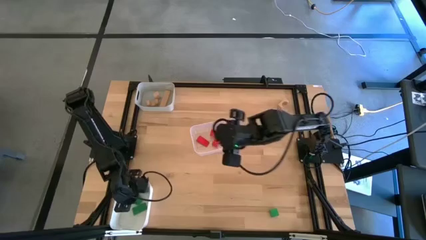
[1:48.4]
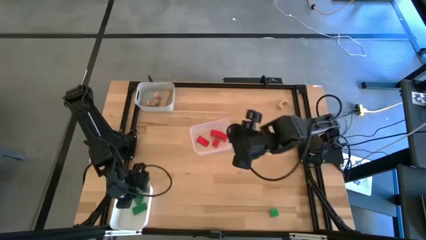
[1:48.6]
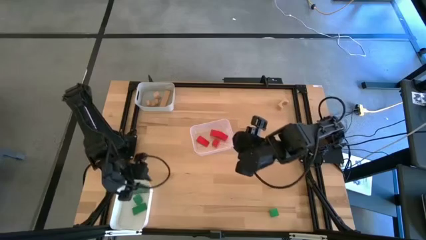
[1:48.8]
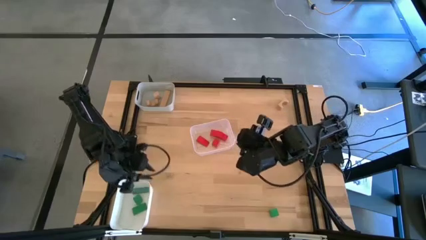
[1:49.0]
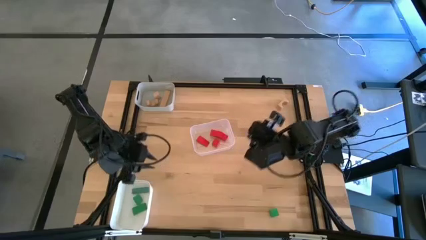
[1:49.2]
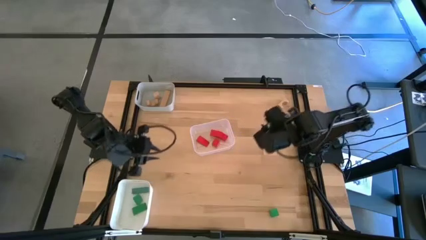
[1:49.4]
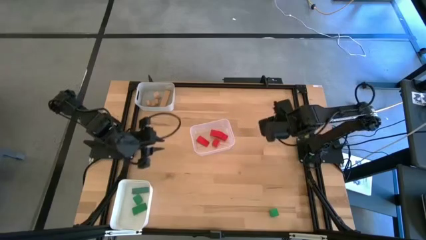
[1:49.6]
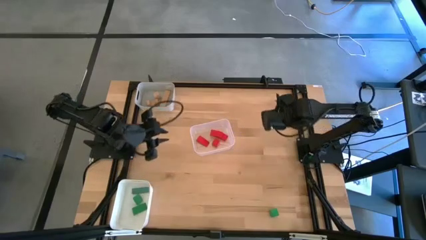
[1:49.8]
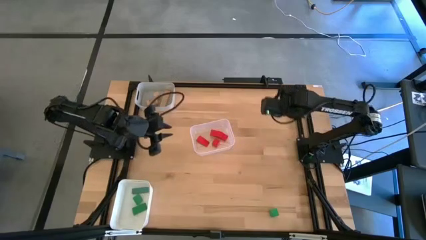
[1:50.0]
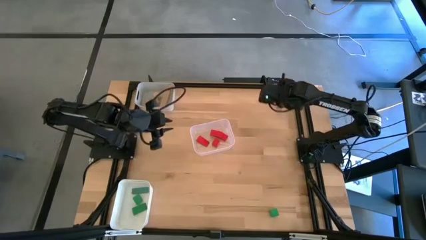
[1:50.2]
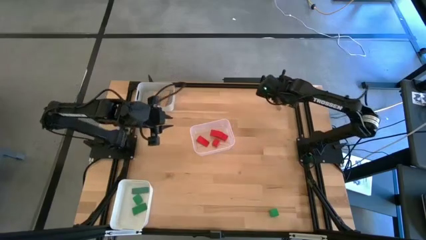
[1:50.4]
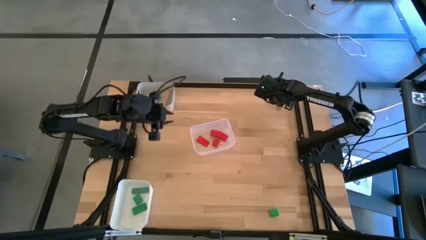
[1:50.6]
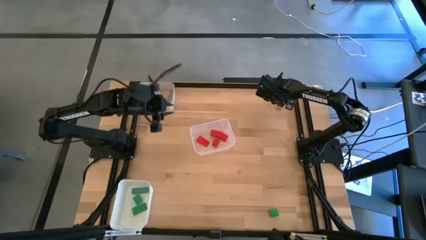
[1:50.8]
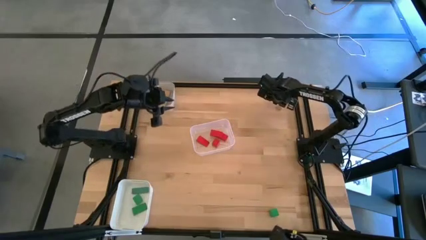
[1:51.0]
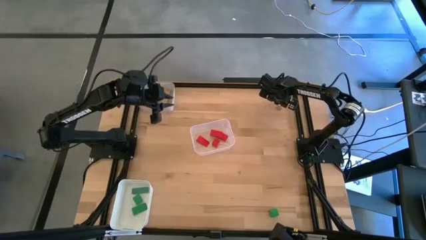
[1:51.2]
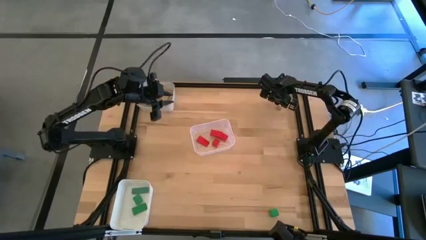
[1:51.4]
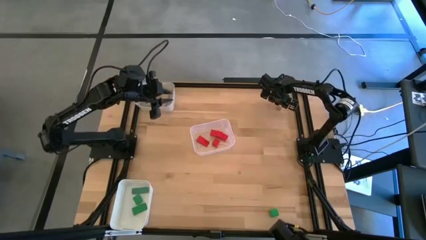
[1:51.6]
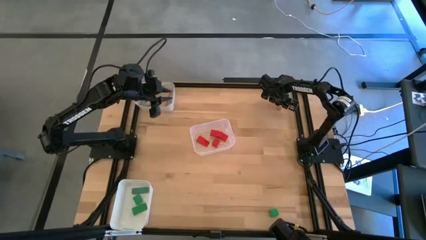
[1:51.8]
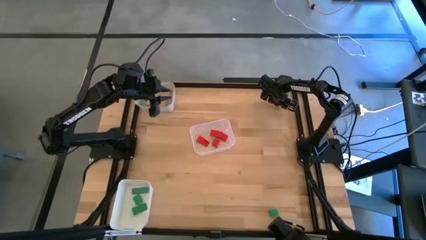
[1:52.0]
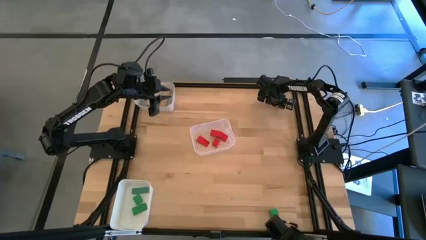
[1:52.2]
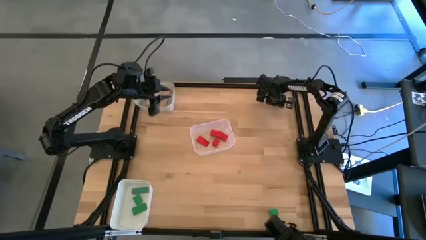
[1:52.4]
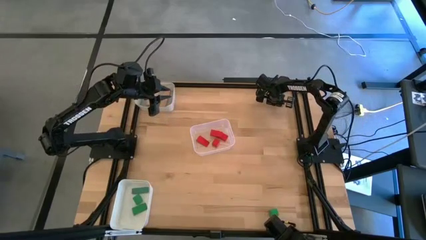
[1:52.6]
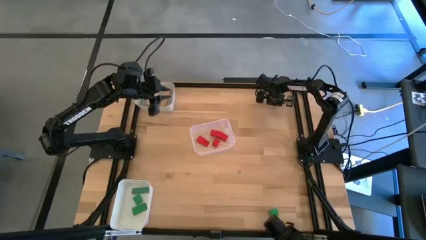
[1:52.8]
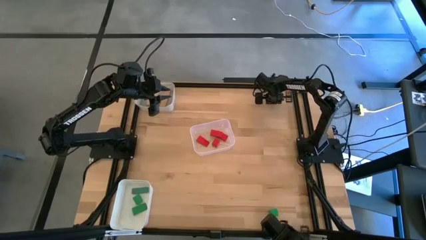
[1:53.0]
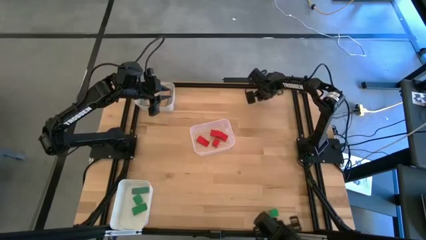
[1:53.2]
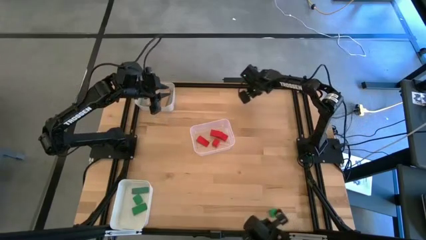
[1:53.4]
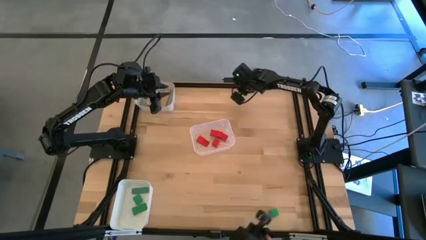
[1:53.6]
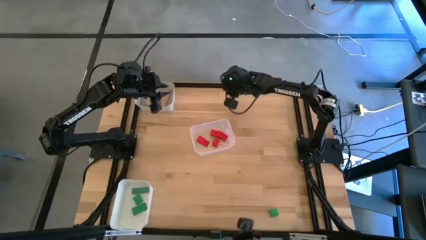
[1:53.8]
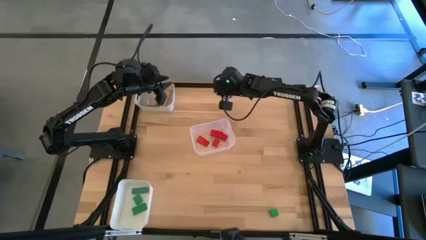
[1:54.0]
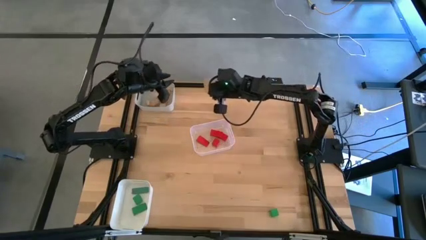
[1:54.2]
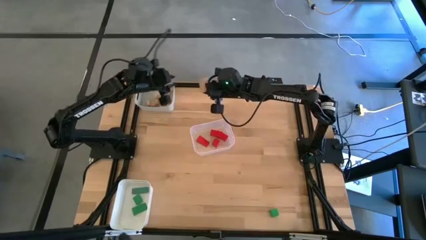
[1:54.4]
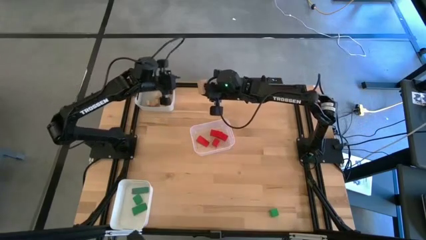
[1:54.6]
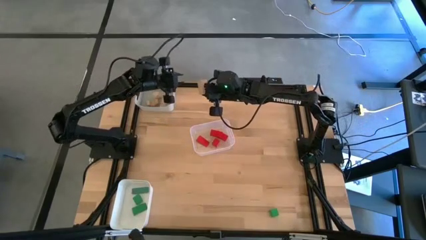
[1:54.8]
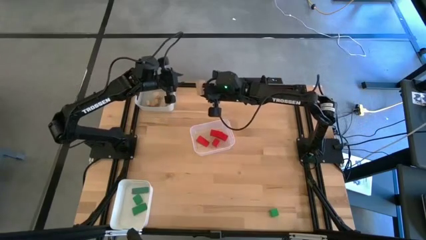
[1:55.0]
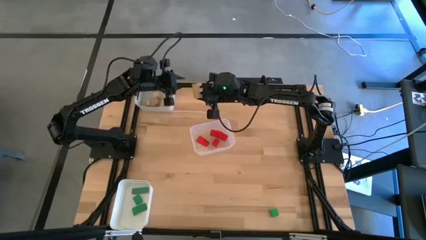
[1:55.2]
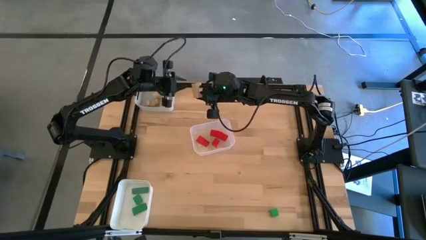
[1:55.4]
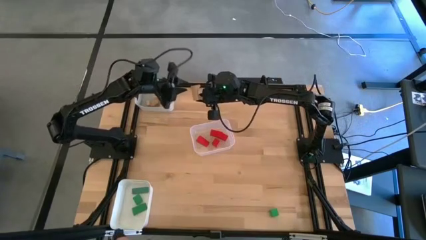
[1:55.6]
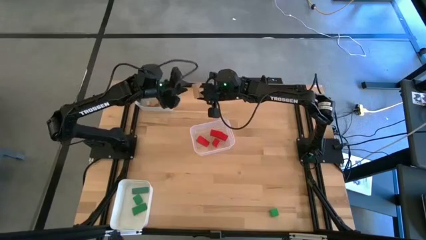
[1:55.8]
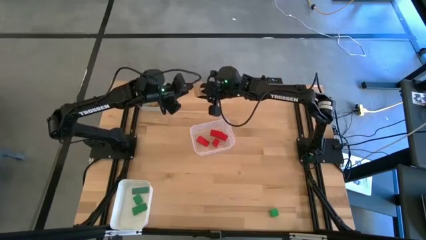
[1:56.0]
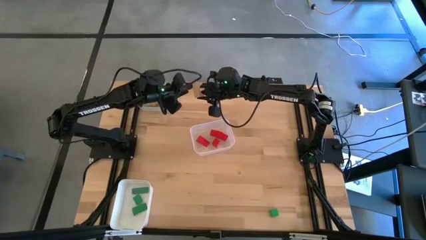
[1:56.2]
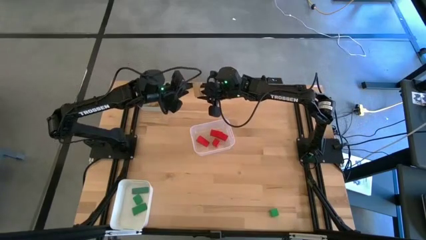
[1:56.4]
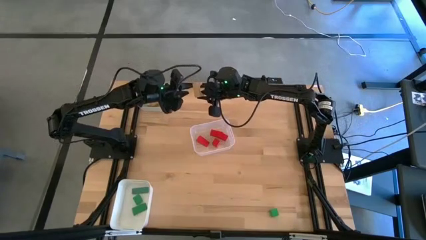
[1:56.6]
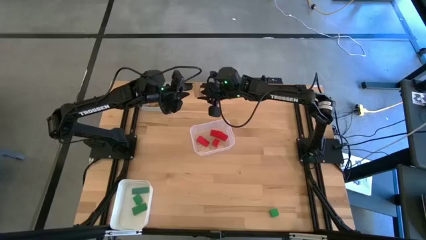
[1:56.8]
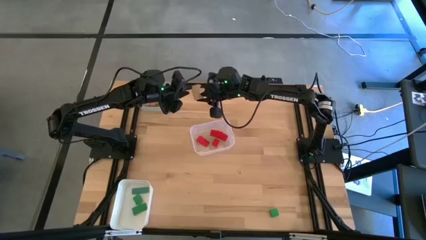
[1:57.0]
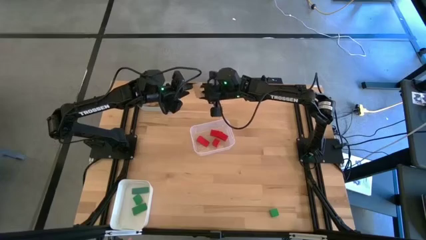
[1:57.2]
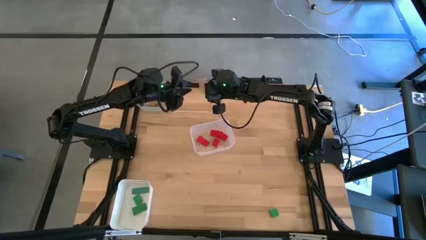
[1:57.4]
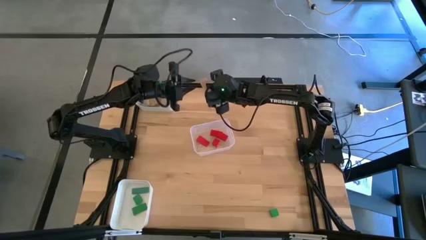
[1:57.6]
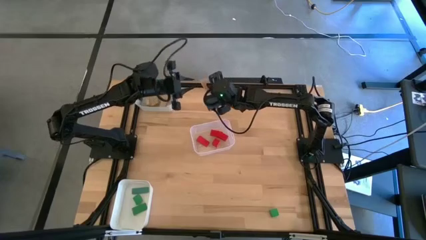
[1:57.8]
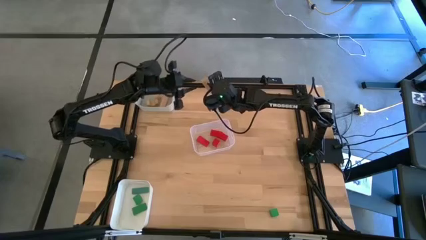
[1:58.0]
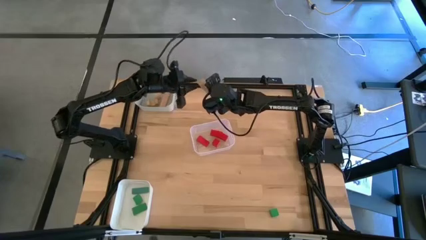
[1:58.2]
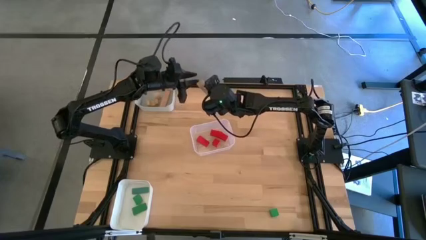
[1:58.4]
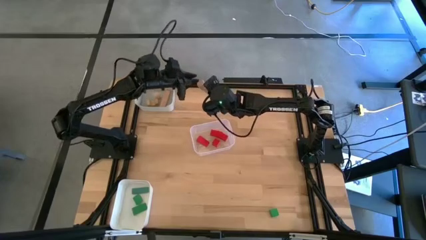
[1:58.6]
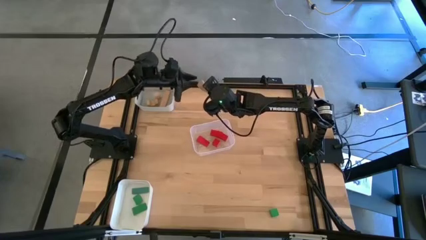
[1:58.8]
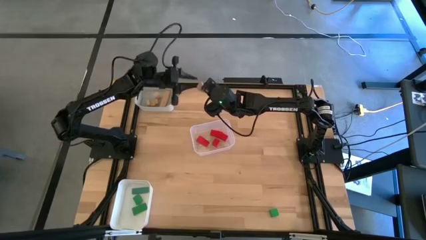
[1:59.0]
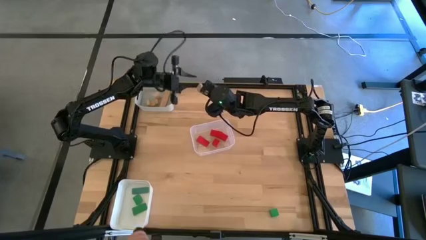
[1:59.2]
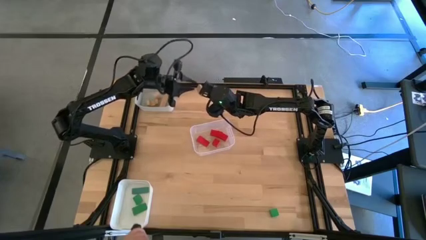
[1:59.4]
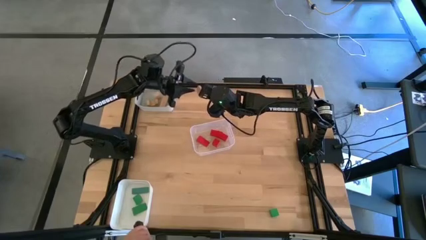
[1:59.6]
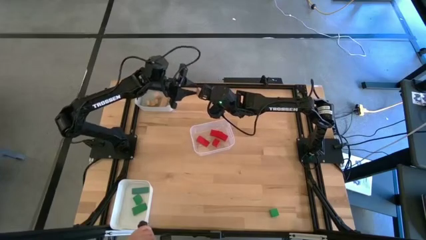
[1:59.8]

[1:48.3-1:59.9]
Task: Sort & place blocks by color
Put the brown block into the gray bin

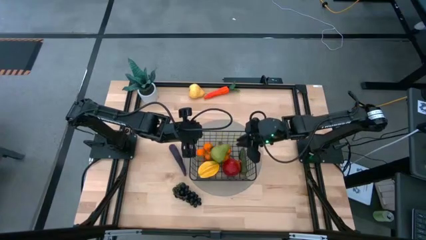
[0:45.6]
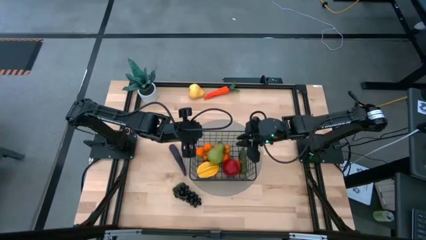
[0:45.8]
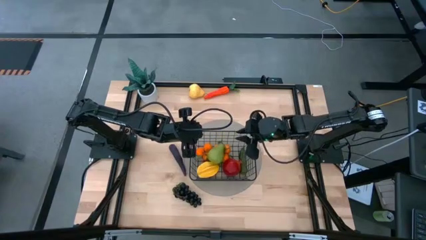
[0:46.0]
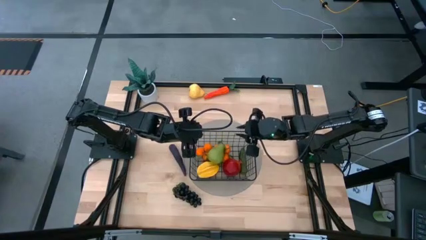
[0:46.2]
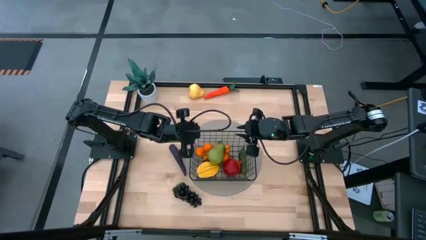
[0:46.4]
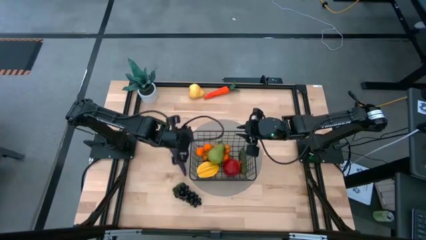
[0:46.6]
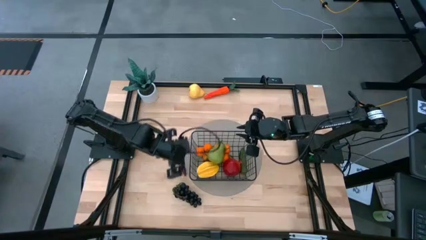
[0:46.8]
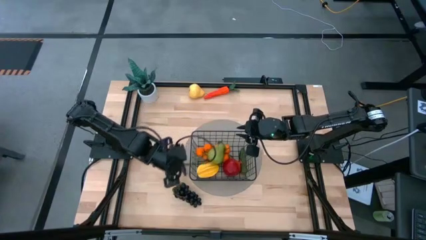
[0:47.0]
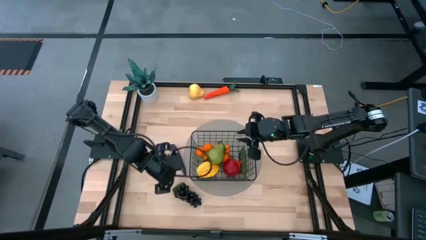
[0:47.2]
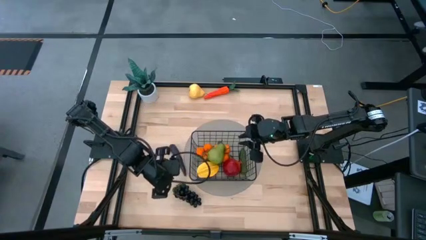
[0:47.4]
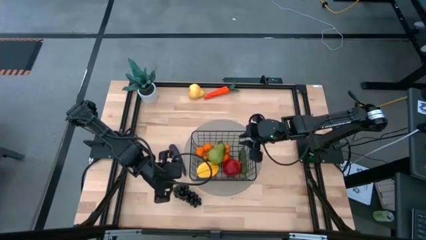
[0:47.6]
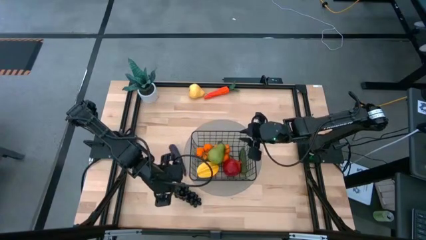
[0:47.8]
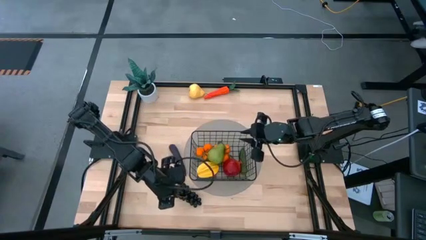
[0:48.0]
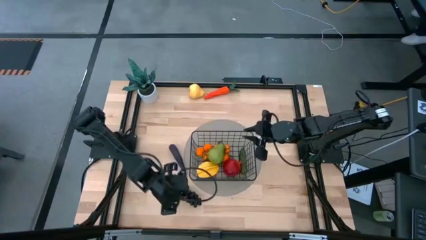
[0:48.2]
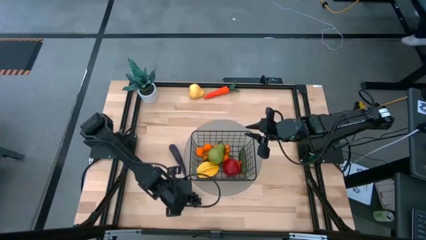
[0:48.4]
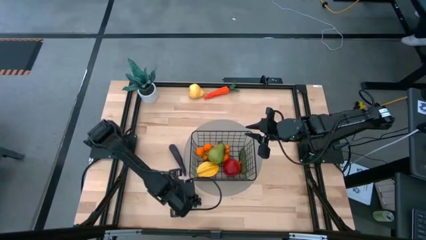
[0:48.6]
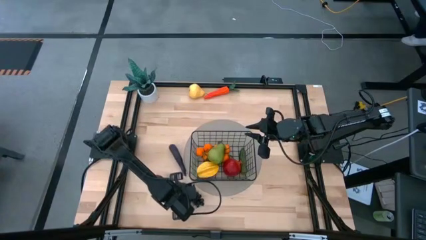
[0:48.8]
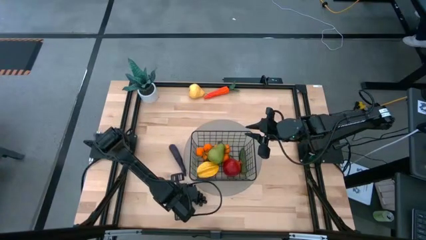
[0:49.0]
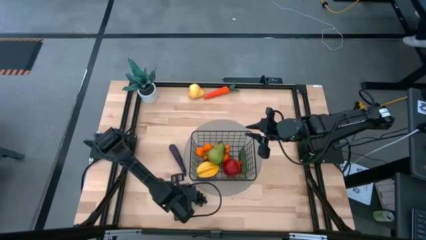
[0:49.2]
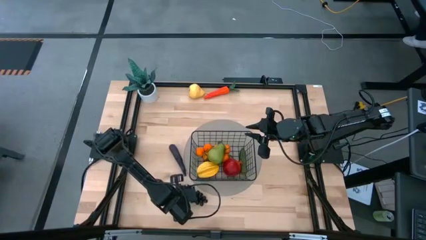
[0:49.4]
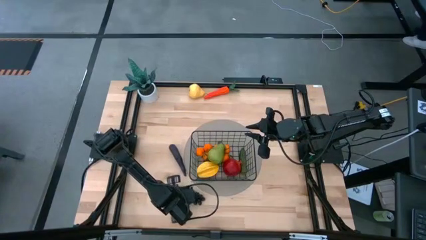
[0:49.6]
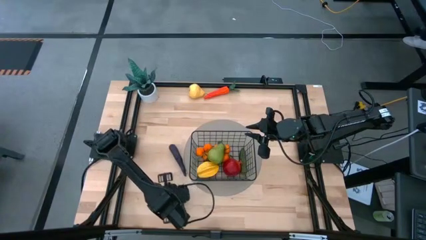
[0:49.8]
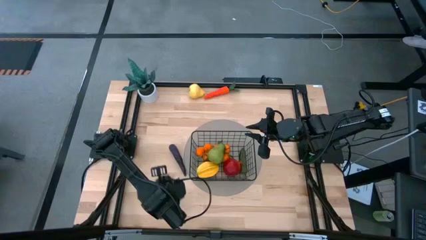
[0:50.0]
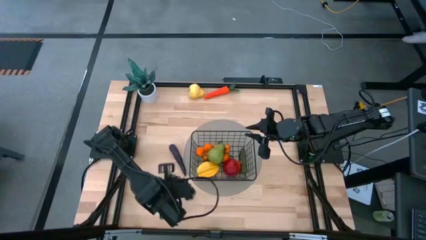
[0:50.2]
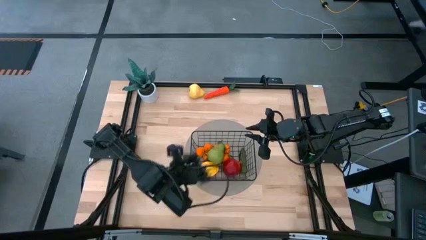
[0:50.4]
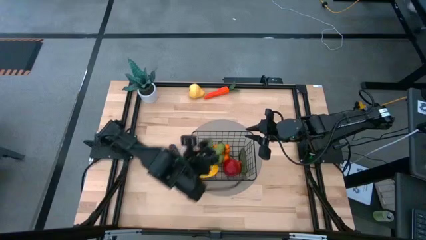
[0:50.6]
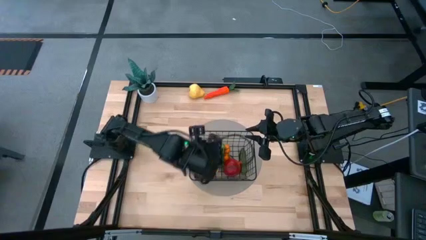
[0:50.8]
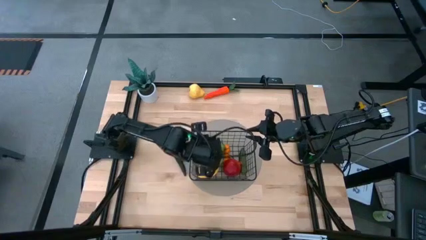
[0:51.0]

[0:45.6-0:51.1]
Task: Build produce basket
Put the dark purple grapes into the black wire basket
